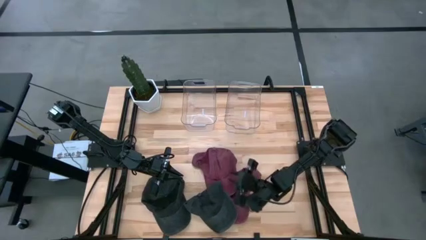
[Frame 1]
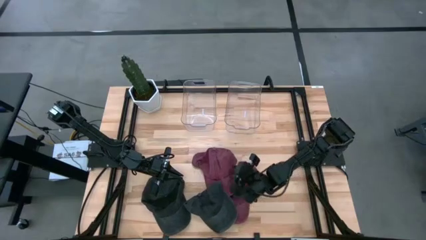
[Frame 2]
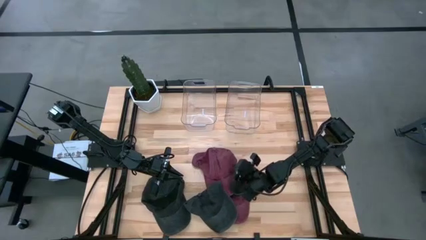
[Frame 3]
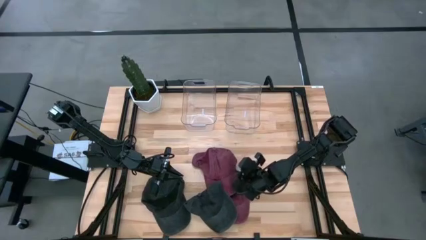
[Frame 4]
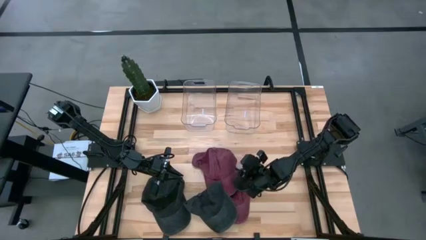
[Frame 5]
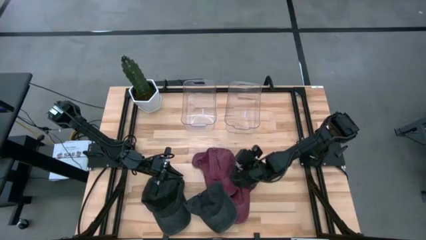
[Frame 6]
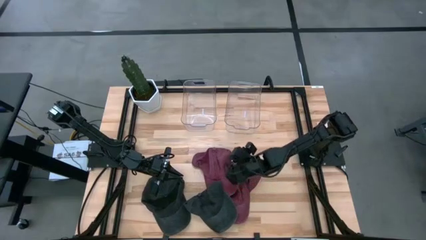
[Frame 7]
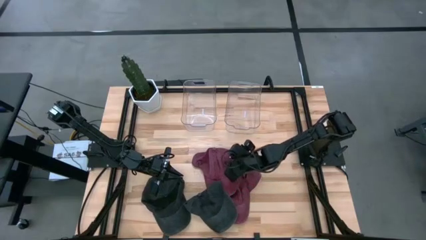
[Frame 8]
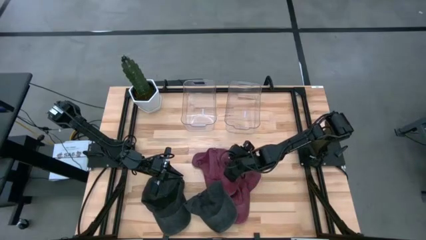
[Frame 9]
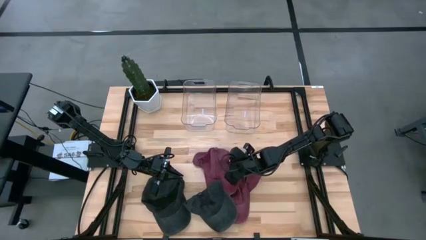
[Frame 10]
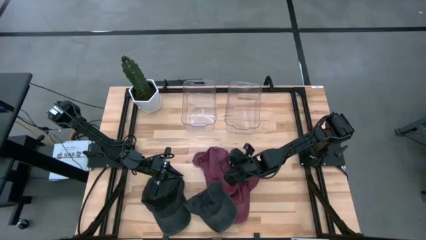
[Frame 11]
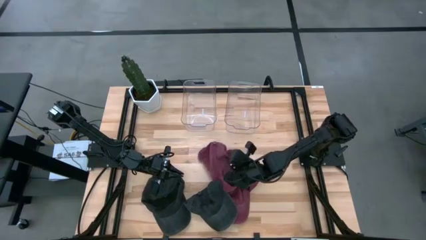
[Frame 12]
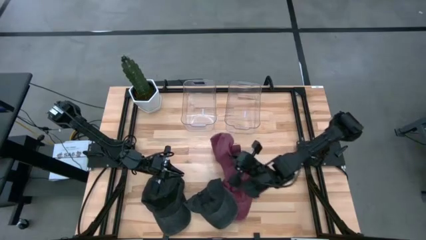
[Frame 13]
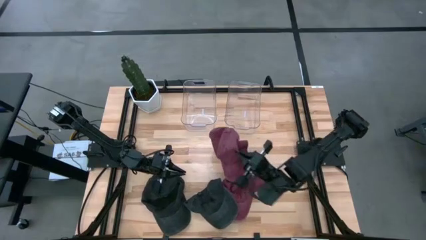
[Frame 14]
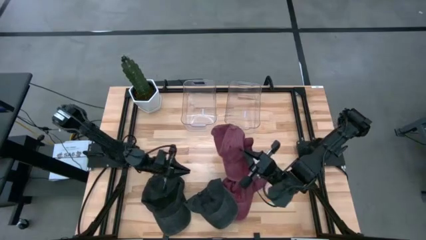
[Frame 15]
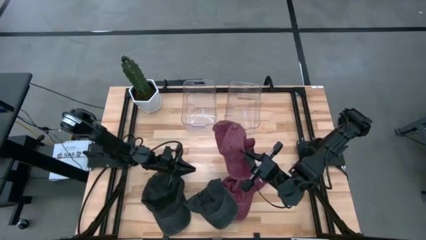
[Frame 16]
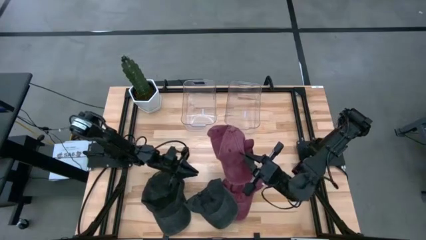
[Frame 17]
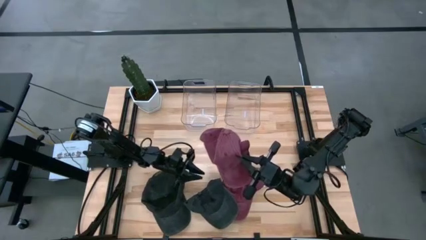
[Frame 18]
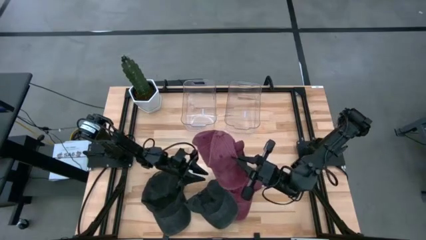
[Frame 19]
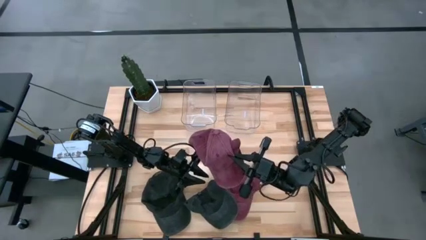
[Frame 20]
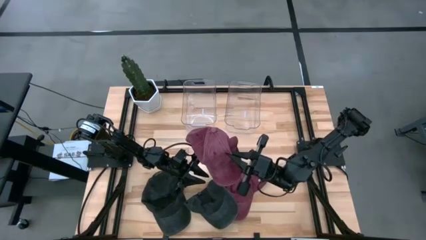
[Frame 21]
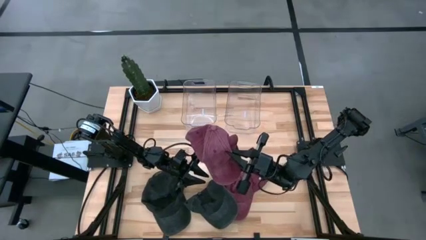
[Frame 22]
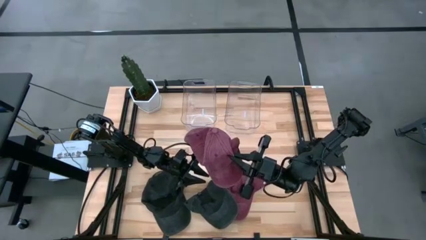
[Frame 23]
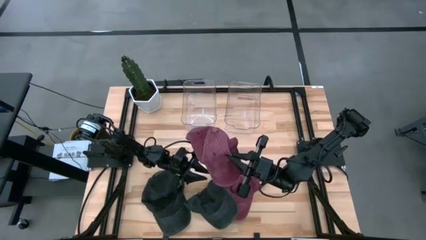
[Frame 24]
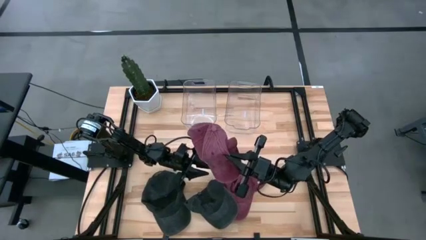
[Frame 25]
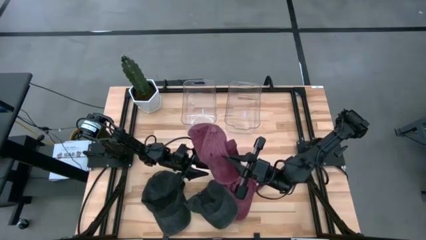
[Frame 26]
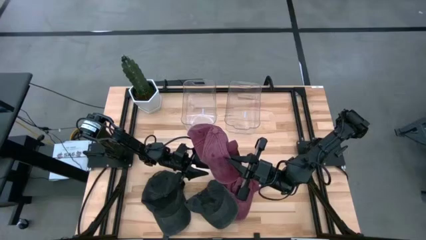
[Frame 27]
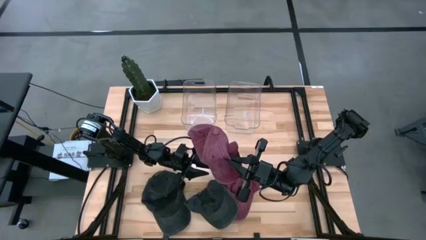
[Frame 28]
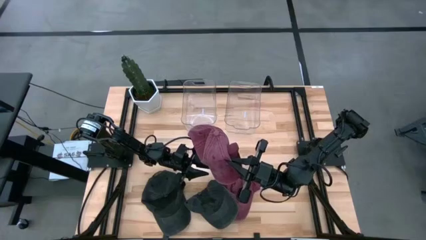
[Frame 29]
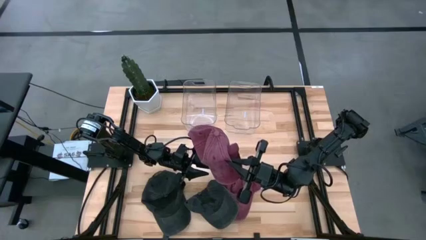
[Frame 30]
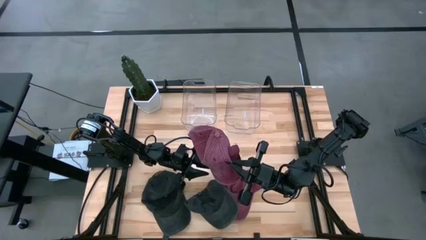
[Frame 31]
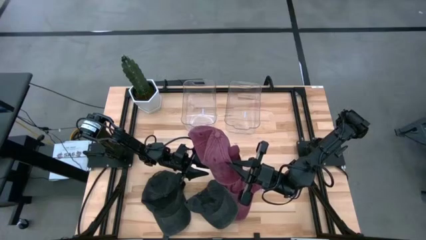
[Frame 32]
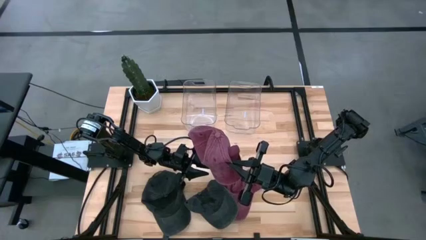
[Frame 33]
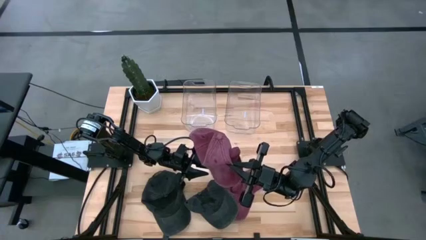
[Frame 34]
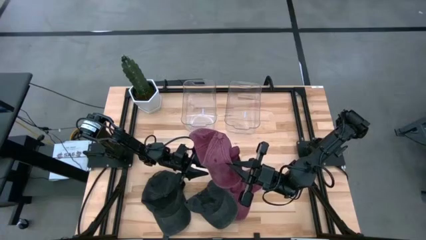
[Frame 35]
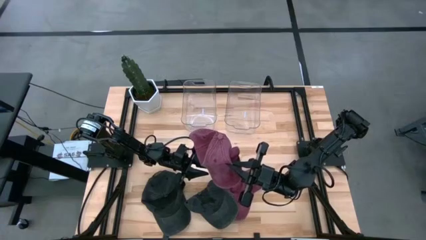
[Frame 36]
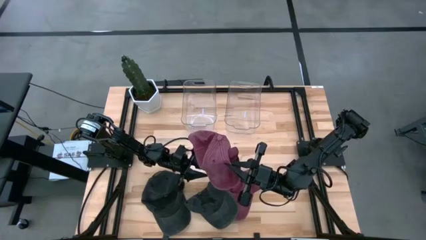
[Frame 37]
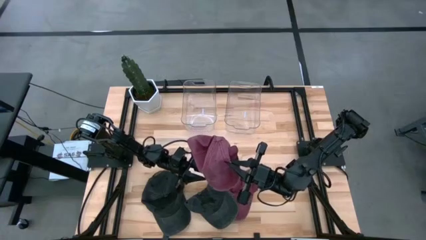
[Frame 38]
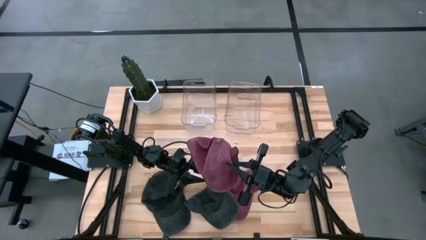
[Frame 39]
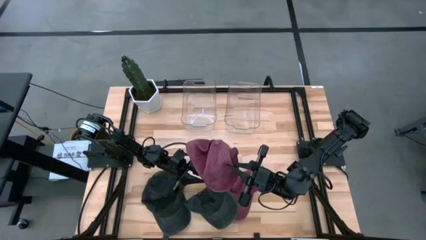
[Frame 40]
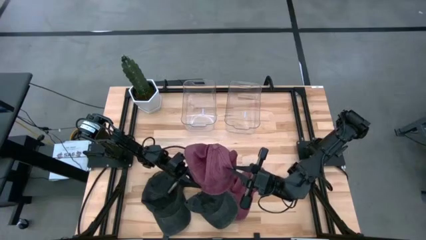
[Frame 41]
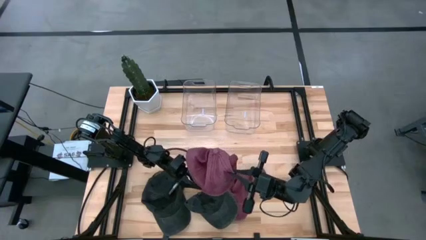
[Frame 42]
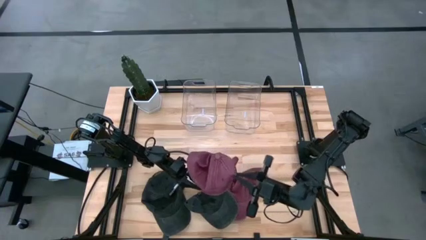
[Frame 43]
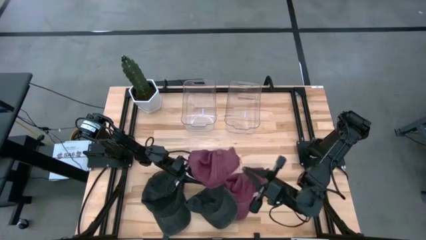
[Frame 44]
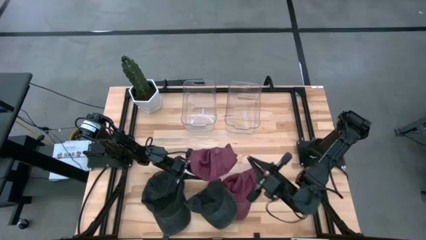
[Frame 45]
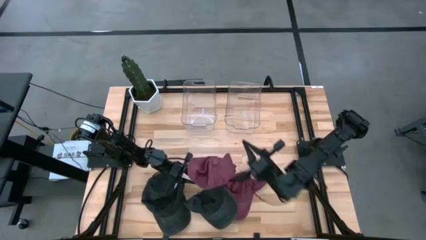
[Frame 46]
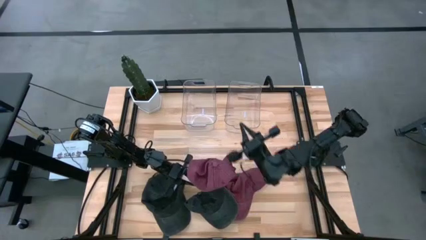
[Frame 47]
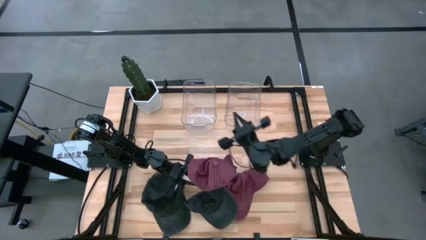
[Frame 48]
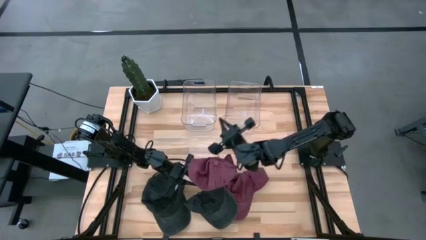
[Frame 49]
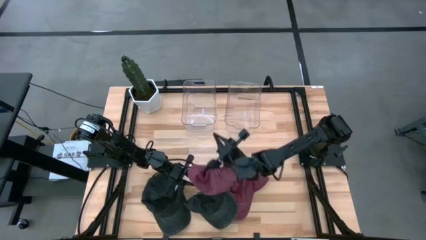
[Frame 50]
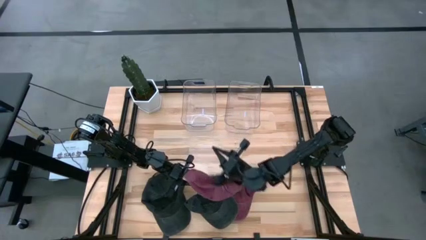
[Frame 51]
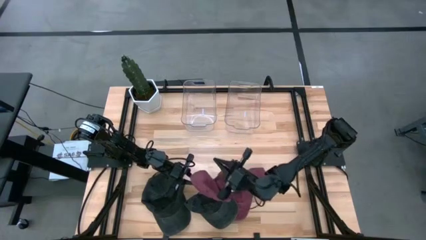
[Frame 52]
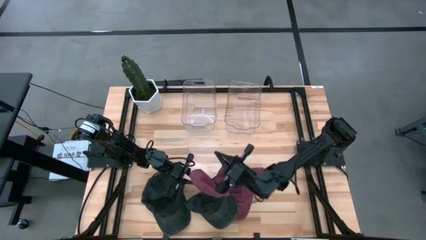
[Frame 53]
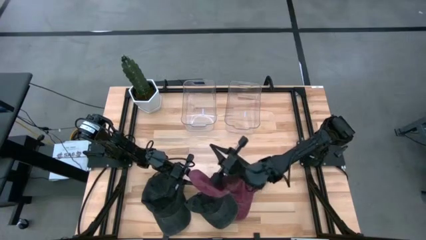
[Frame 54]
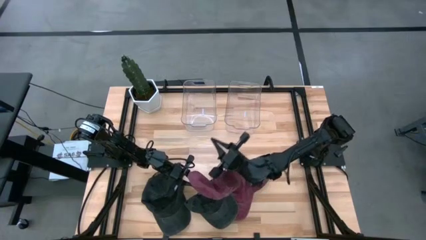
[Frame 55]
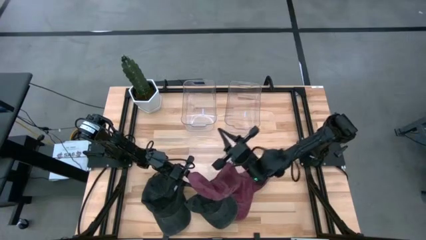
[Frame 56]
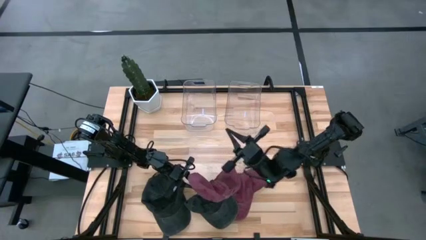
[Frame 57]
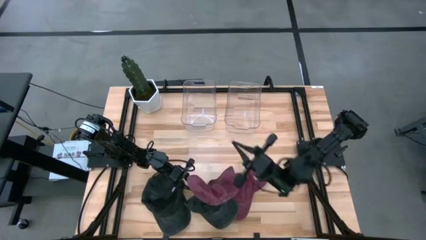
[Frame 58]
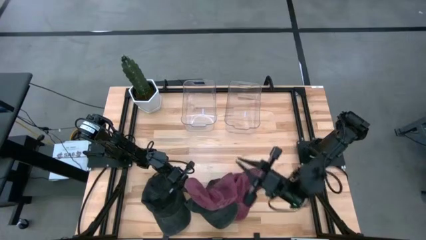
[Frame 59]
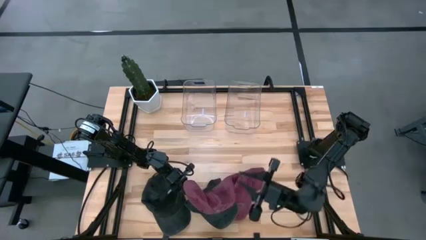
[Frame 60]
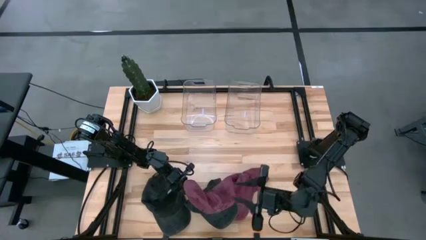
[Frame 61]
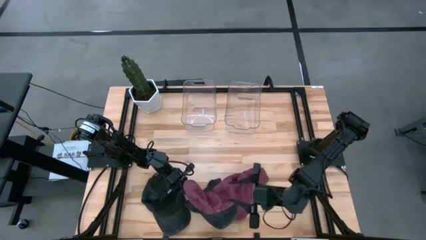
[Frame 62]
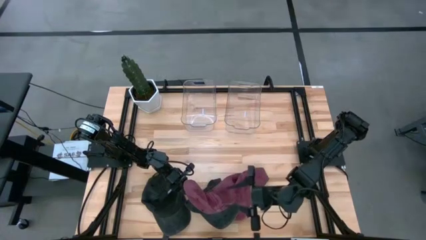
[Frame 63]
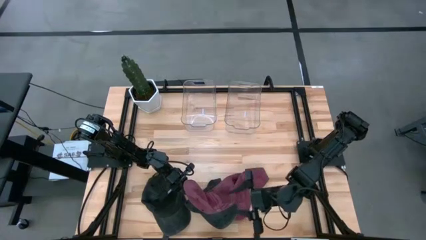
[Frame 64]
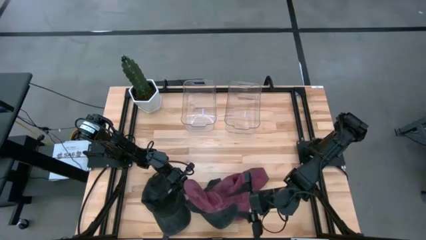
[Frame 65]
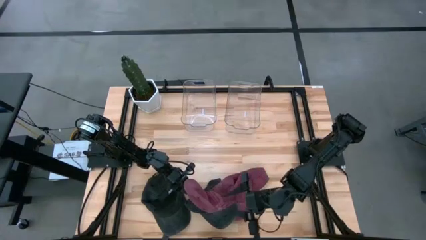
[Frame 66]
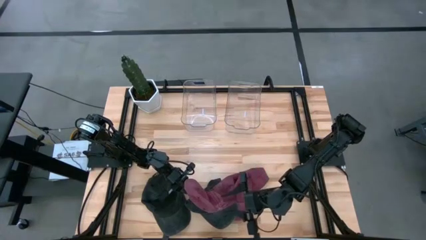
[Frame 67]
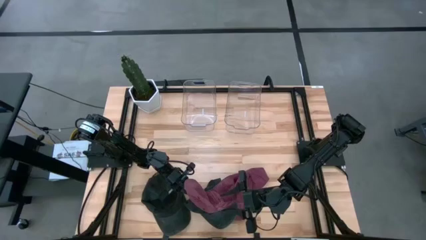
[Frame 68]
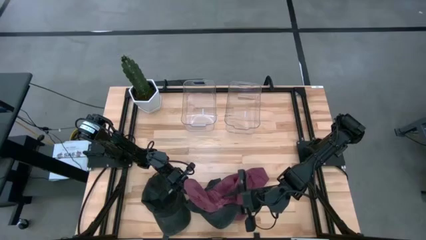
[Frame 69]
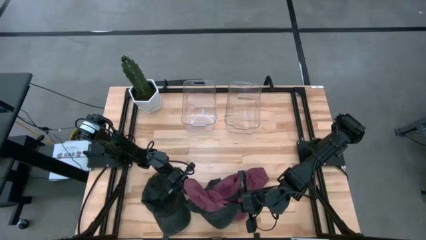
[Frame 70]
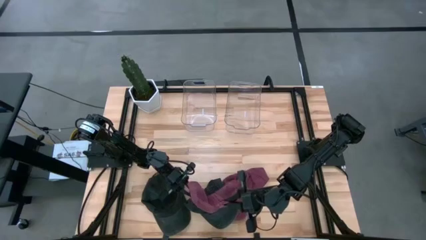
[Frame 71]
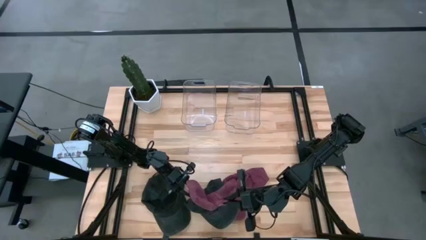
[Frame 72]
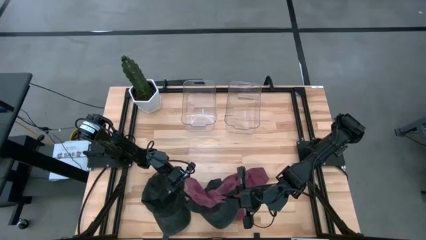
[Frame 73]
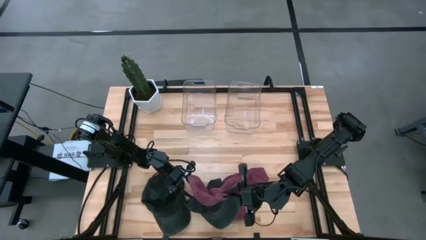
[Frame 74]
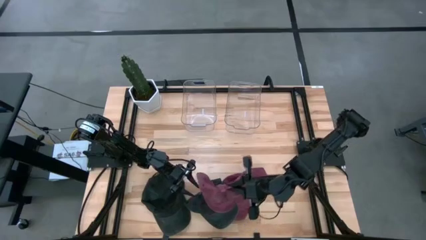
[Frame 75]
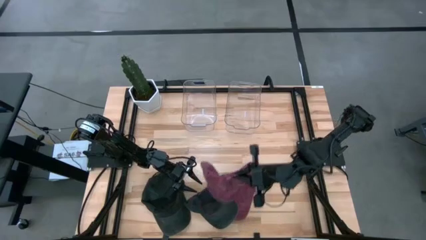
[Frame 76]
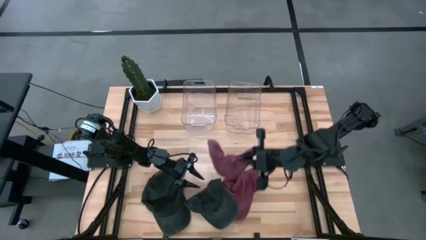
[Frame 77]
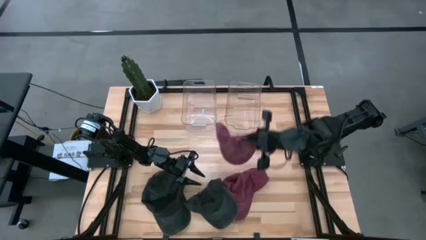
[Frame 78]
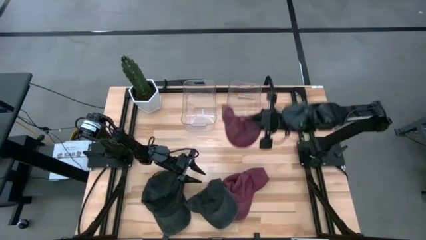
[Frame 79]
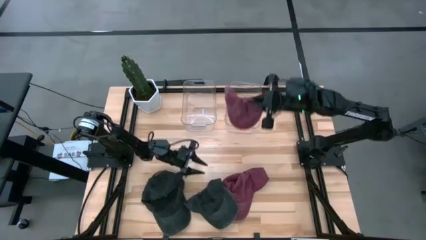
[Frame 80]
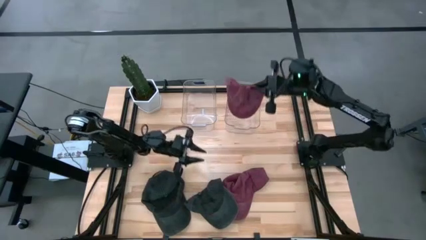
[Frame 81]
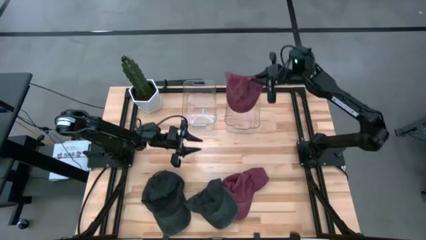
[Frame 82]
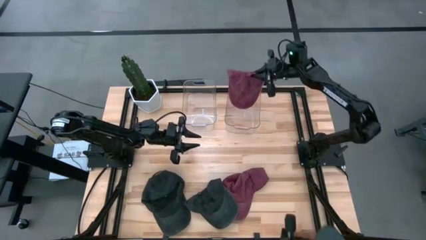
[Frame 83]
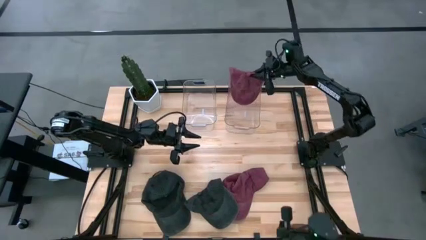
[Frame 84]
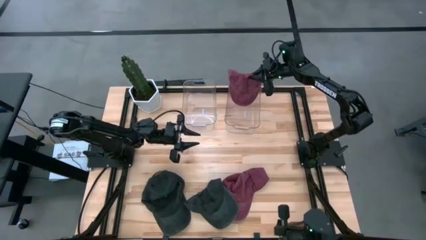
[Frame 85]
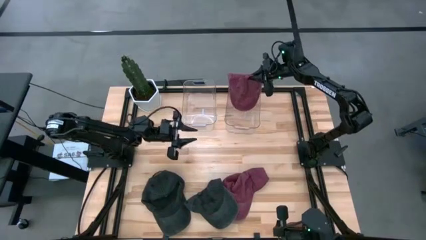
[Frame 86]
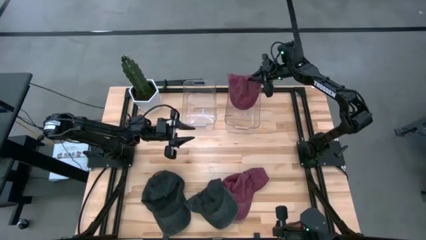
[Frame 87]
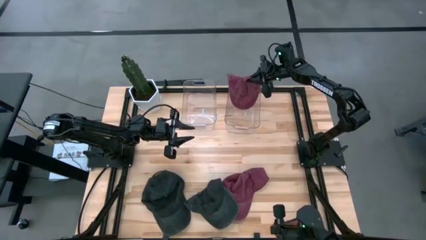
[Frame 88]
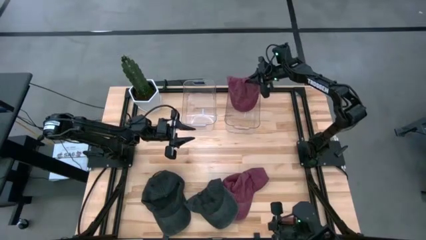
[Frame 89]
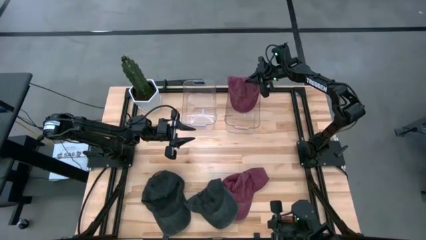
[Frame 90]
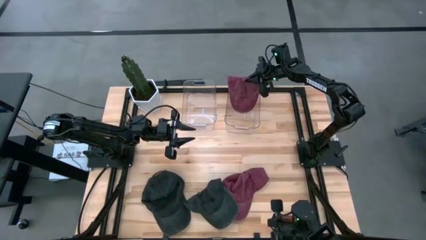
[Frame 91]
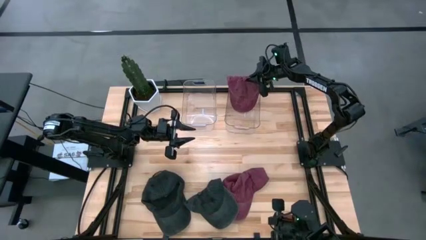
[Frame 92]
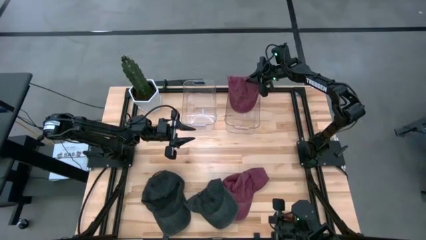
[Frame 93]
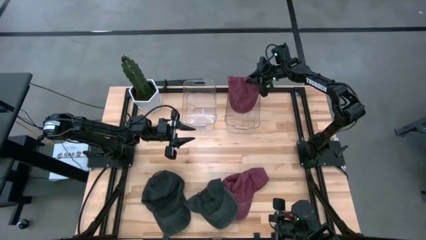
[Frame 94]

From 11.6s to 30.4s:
Task: Pick & Place hat
Put the top maroon head cap into the right transparent bin
